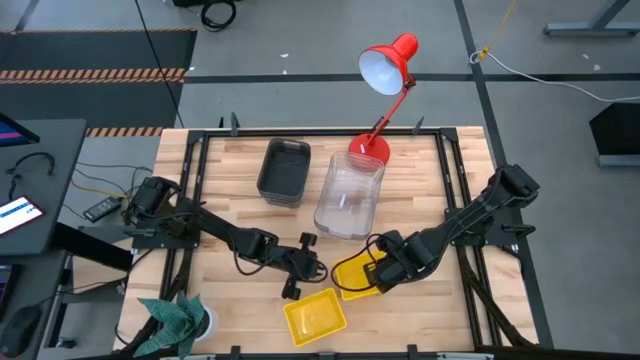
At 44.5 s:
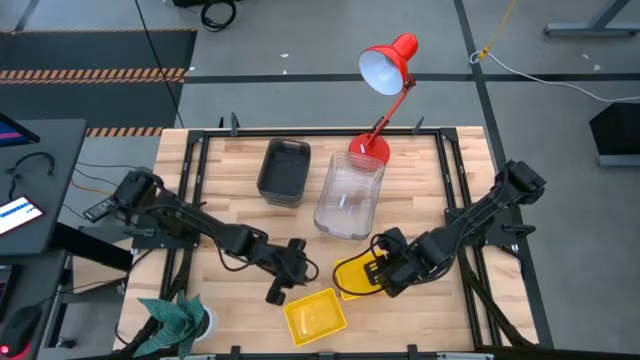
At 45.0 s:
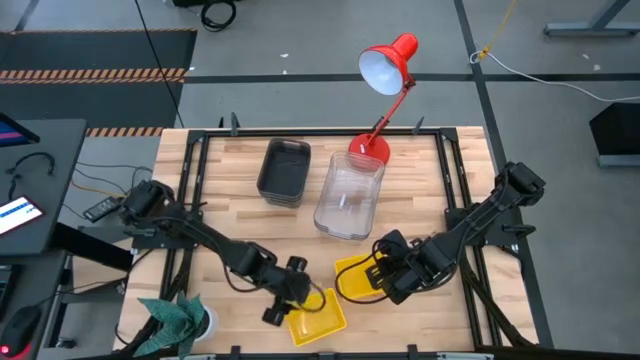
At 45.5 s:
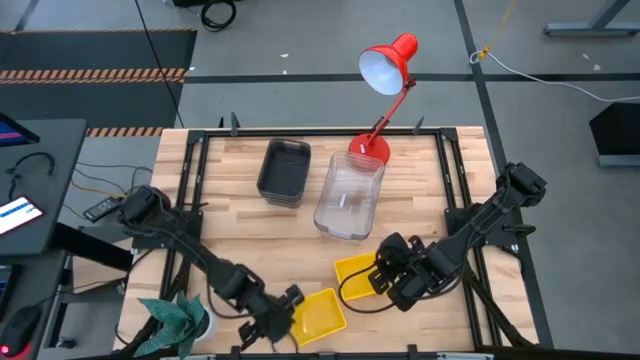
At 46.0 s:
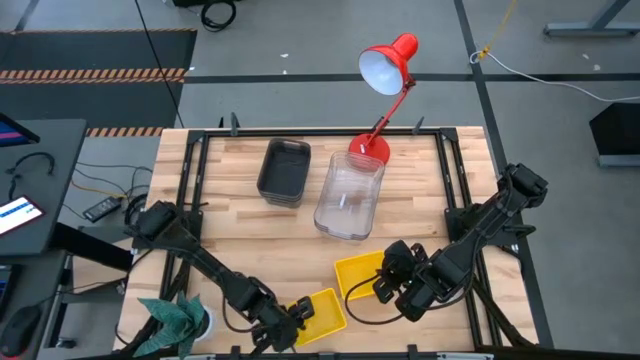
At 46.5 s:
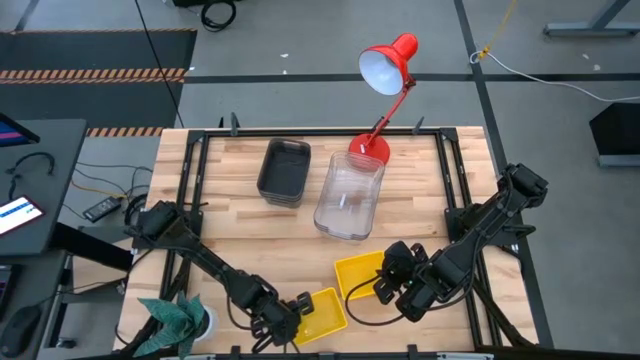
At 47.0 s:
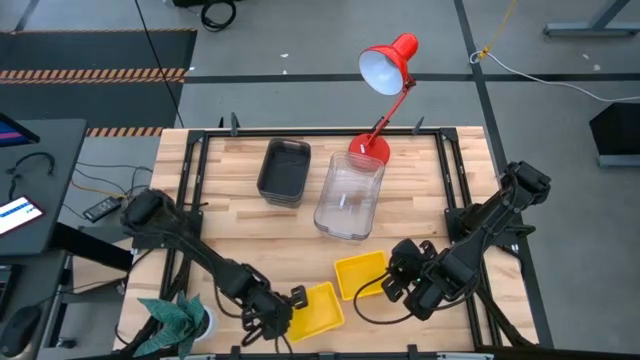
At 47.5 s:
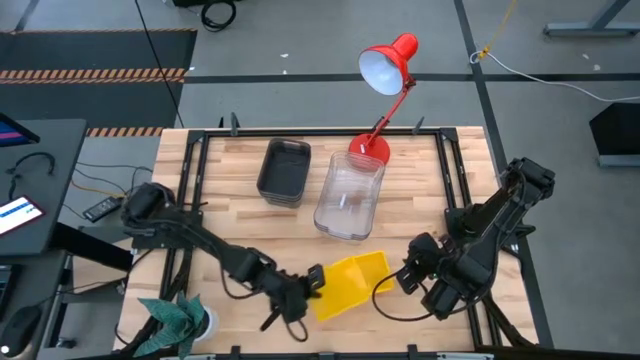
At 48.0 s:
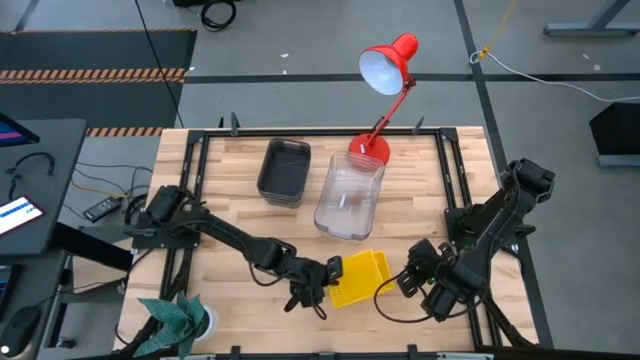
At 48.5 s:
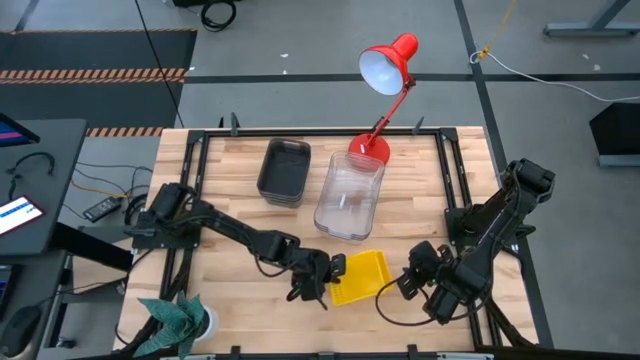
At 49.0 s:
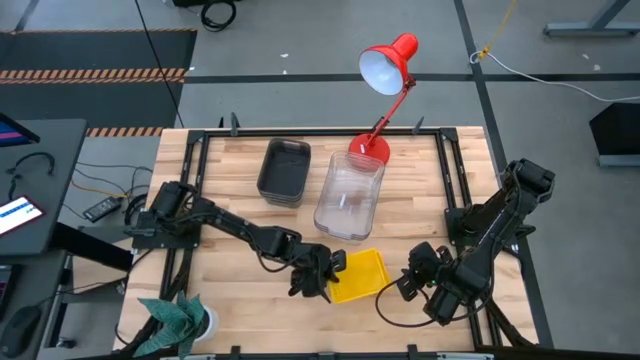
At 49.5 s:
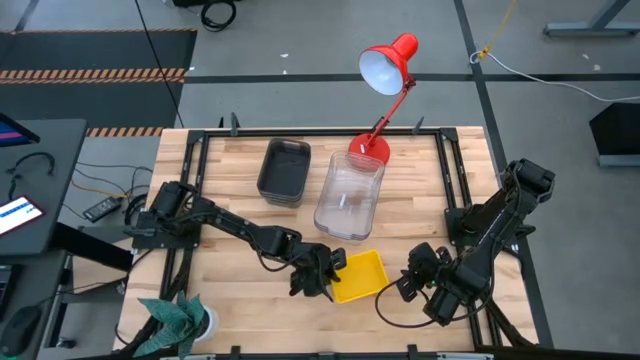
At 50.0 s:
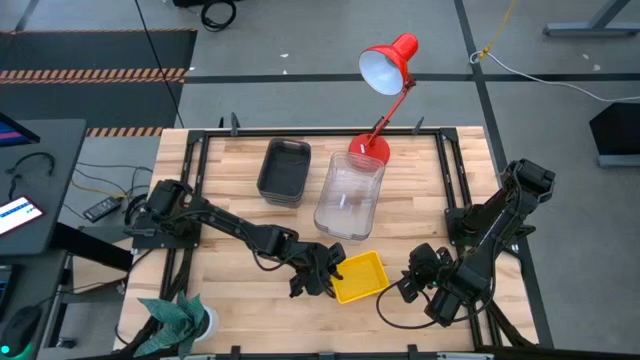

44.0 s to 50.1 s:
Stack the left yellow bin on the right yellow bin

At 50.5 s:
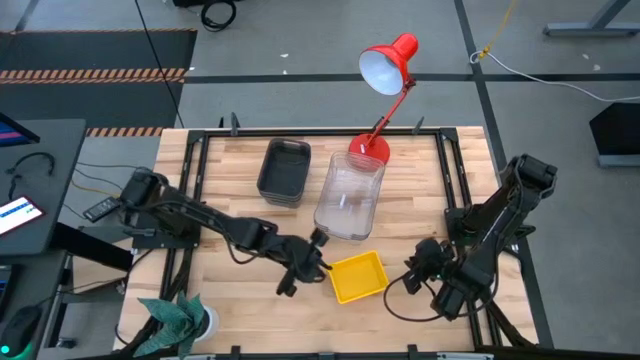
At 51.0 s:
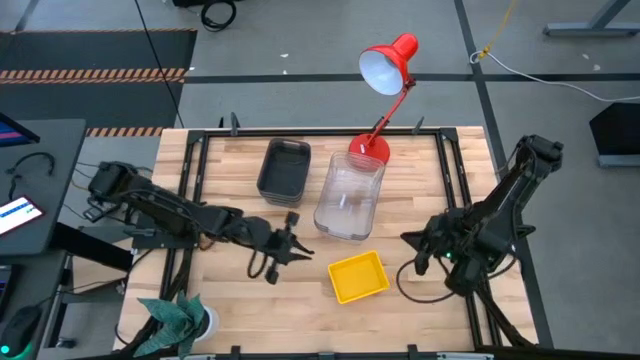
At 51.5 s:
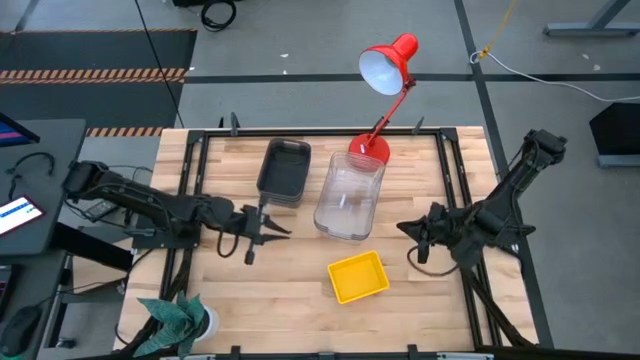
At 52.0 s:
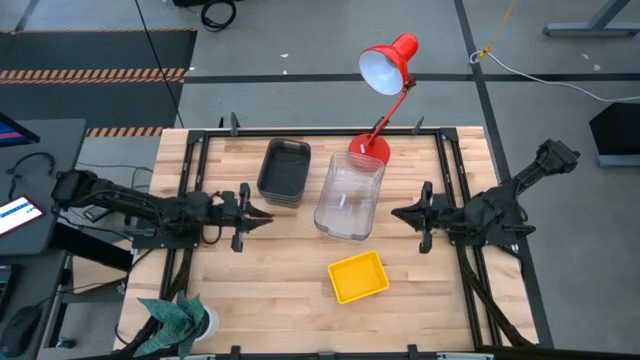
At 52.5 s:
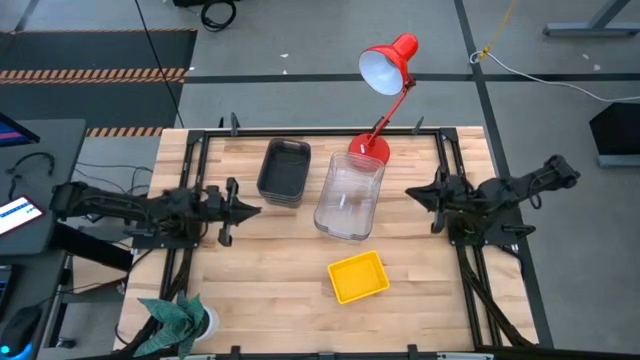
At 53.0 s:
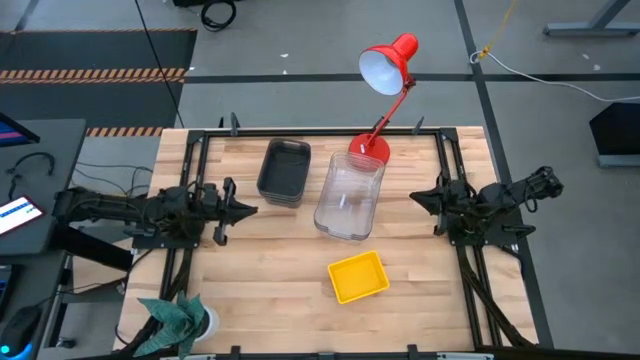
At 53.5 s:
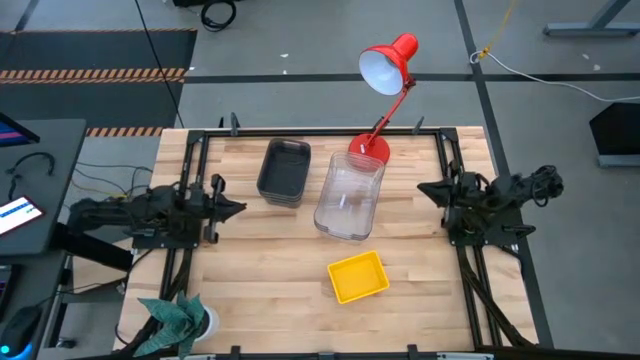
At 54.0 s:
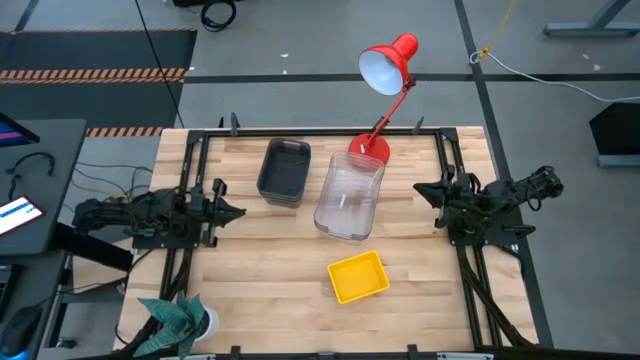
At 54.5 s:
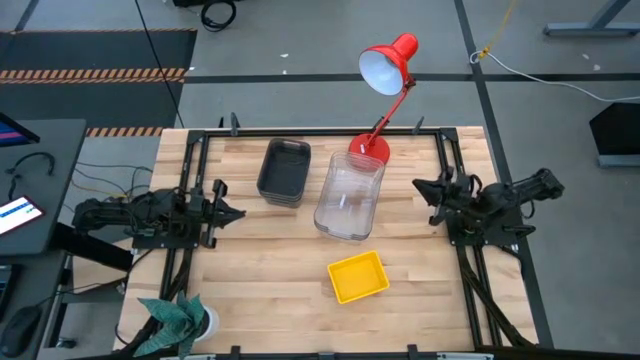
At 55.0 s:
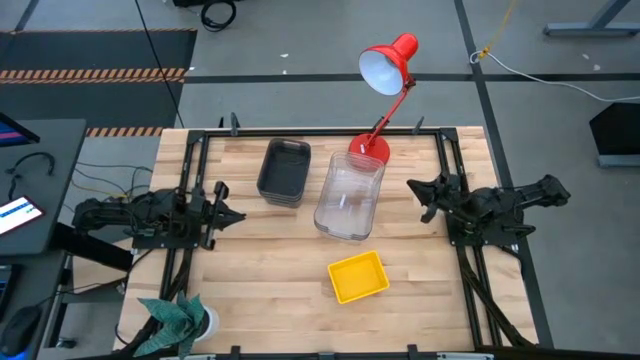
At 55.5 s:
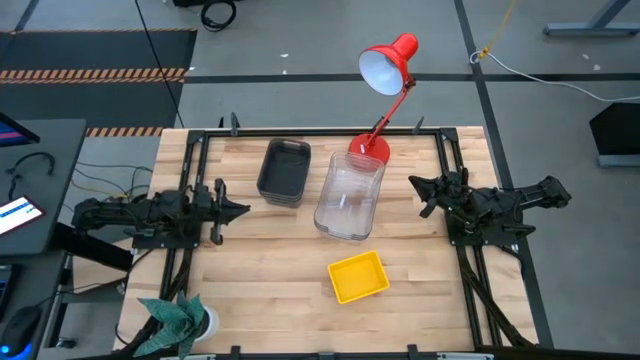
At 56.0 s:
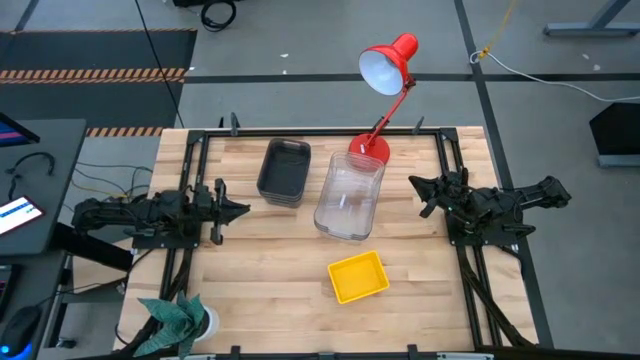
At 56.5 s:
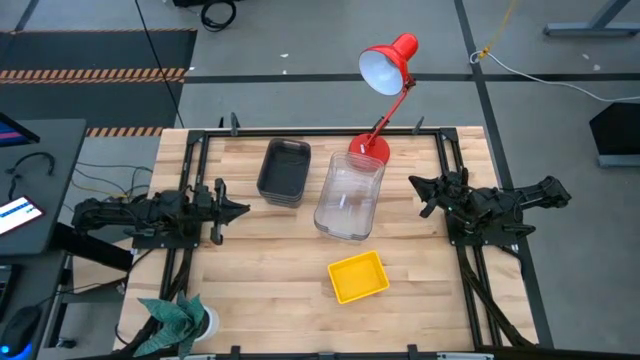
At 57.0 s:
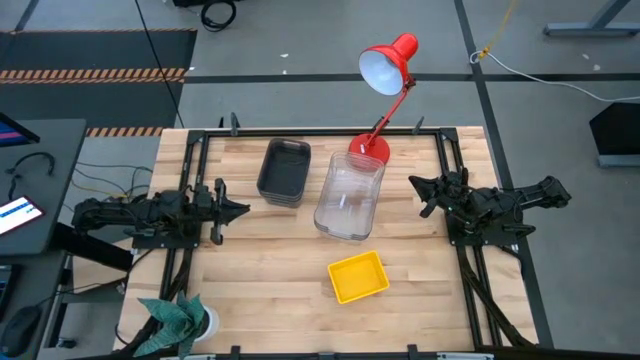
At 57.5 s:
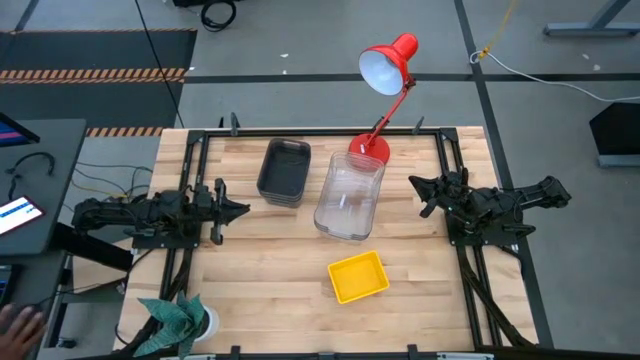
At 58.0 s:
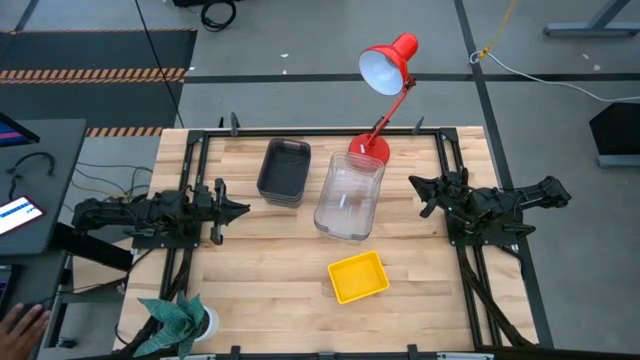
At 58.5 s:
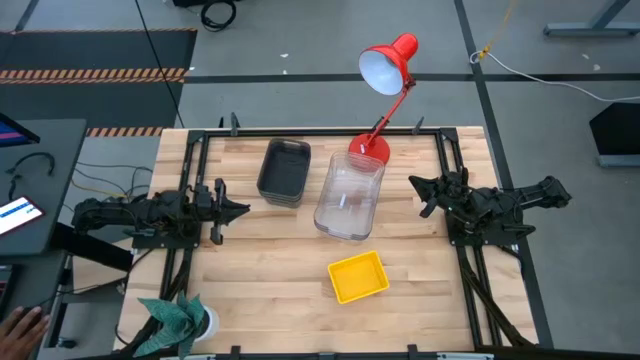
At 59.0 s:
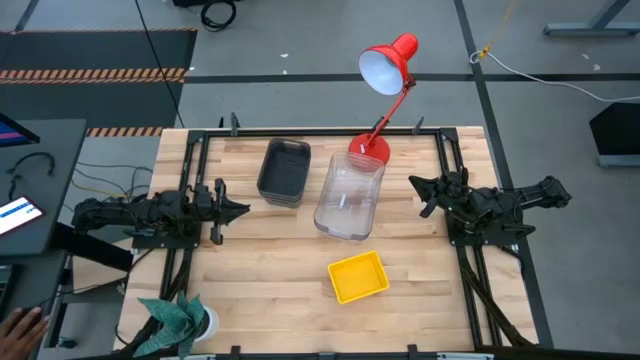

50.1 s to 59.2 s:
Return to Home Position
